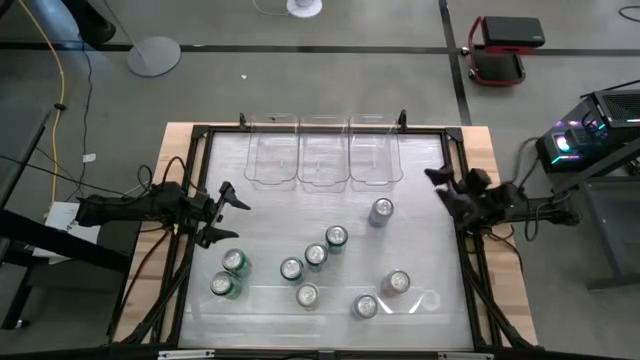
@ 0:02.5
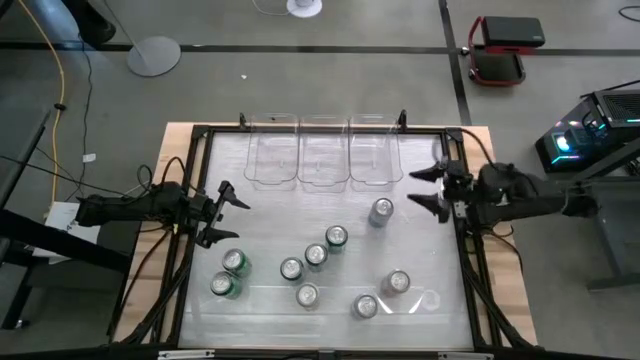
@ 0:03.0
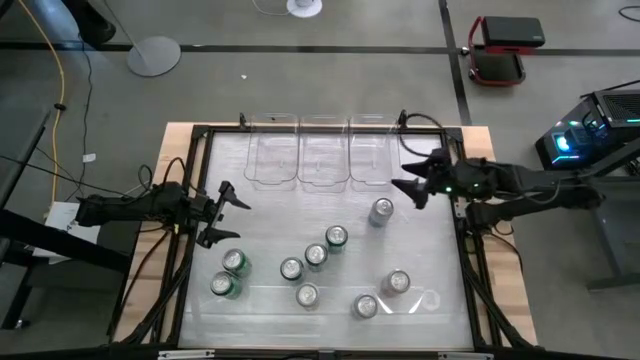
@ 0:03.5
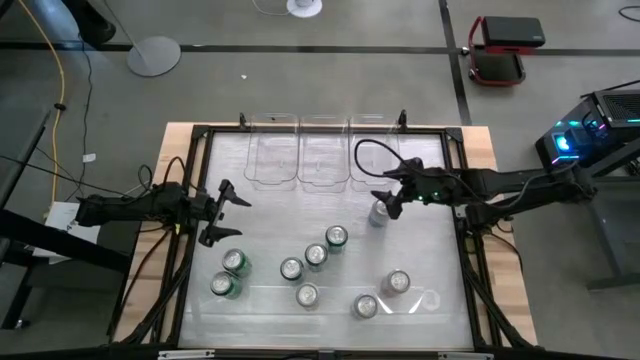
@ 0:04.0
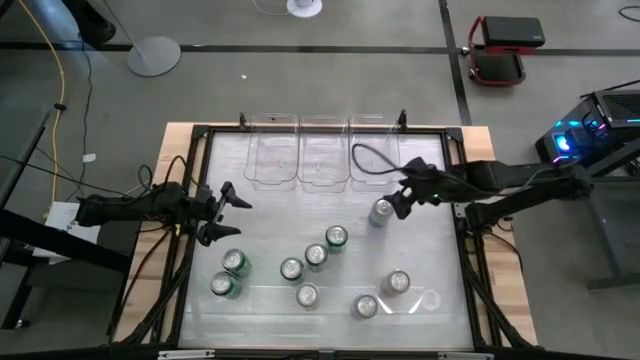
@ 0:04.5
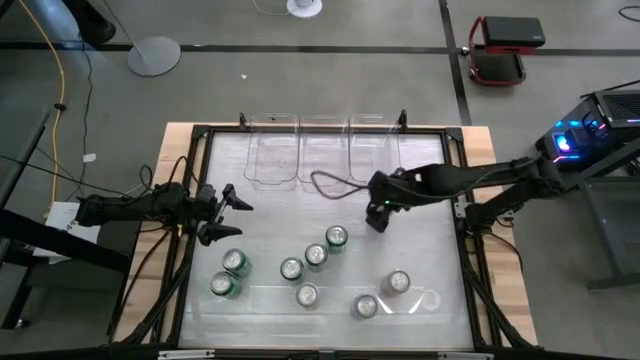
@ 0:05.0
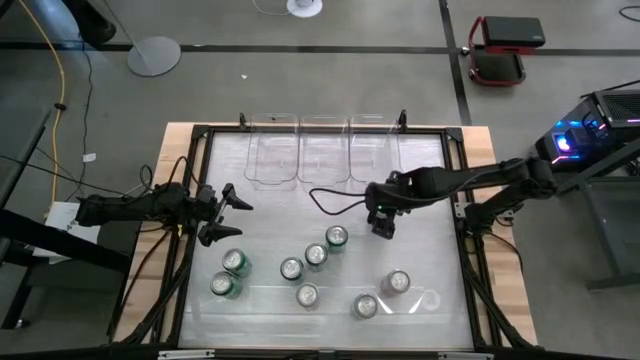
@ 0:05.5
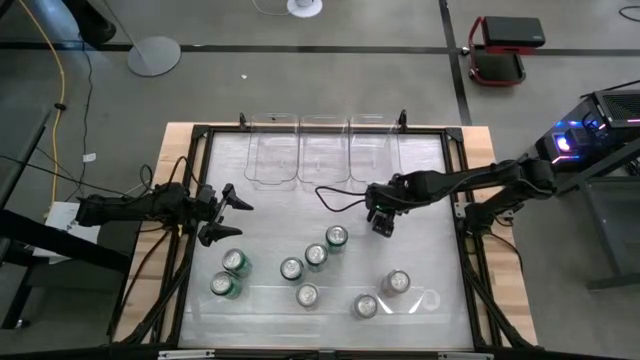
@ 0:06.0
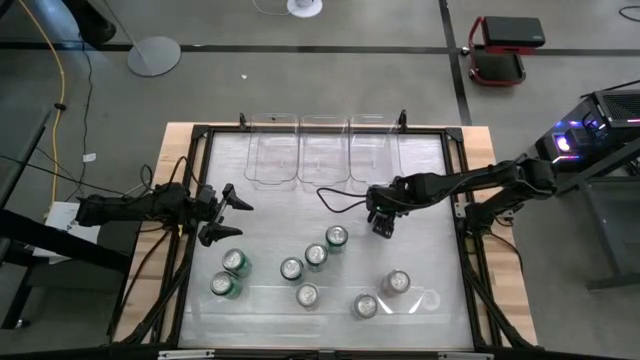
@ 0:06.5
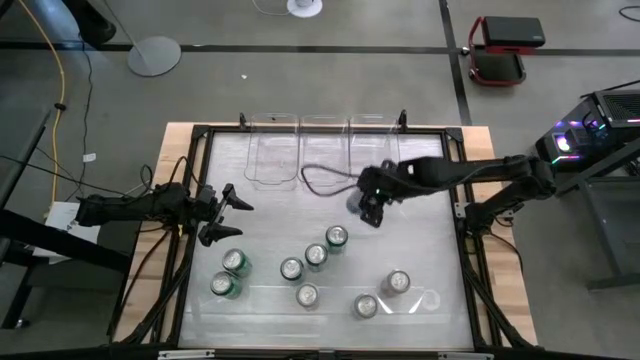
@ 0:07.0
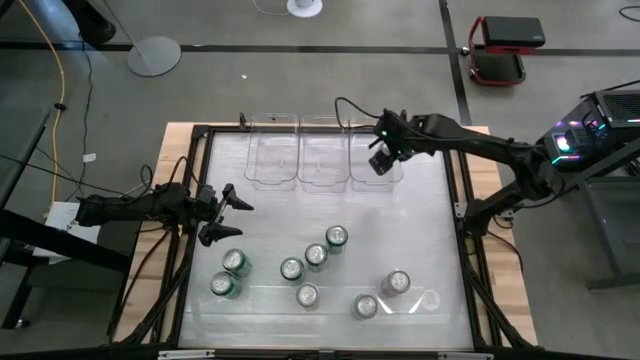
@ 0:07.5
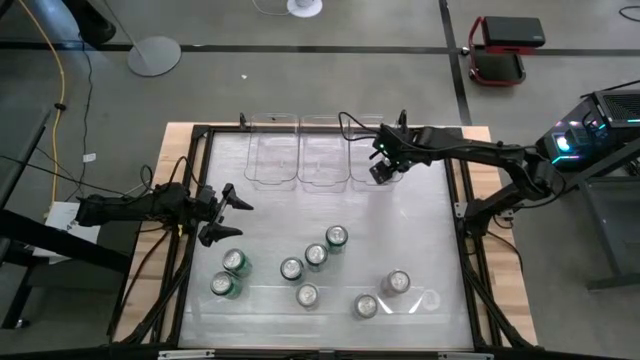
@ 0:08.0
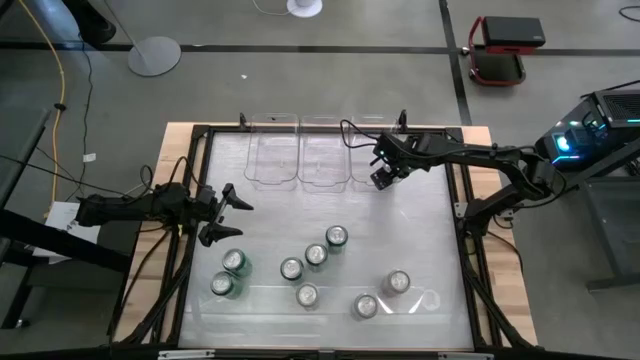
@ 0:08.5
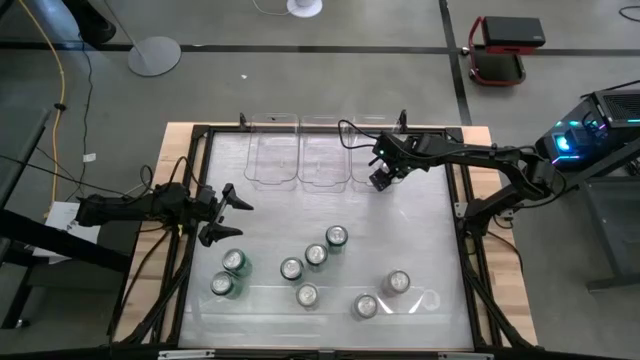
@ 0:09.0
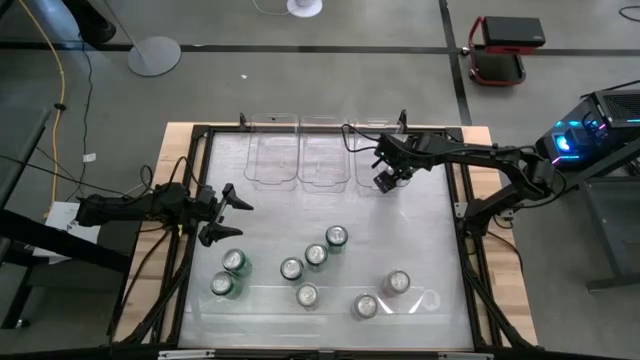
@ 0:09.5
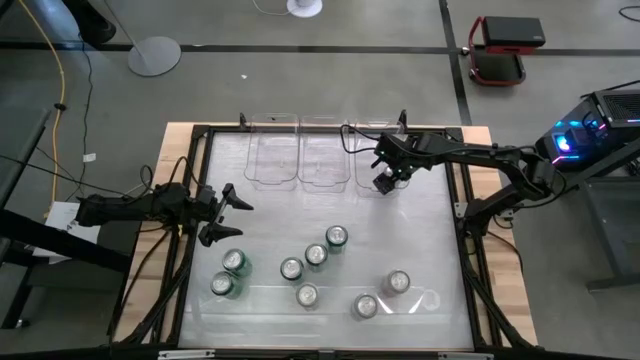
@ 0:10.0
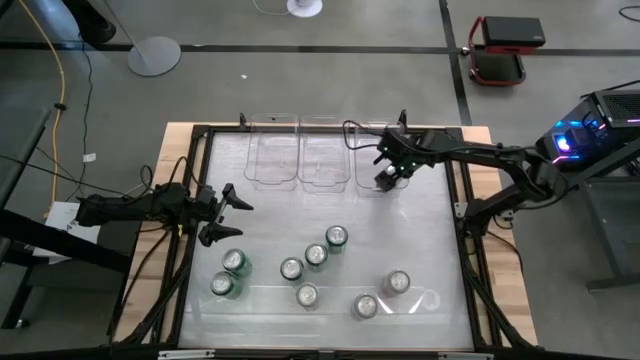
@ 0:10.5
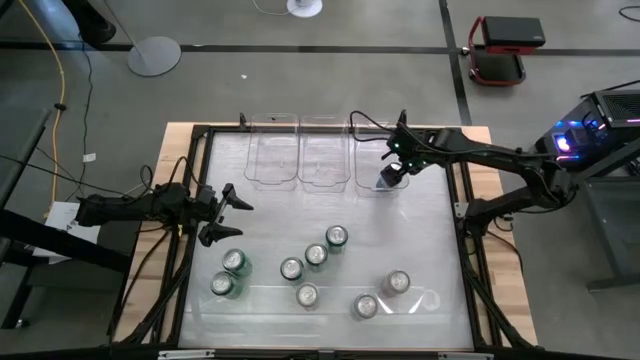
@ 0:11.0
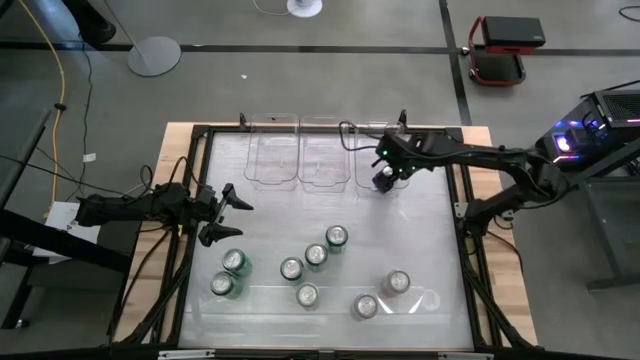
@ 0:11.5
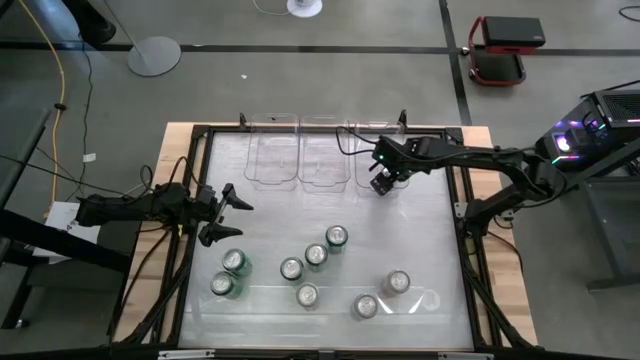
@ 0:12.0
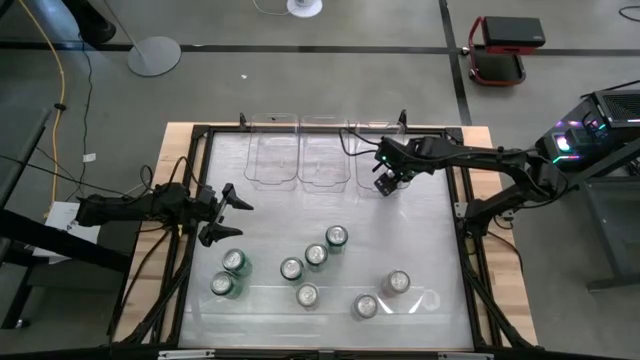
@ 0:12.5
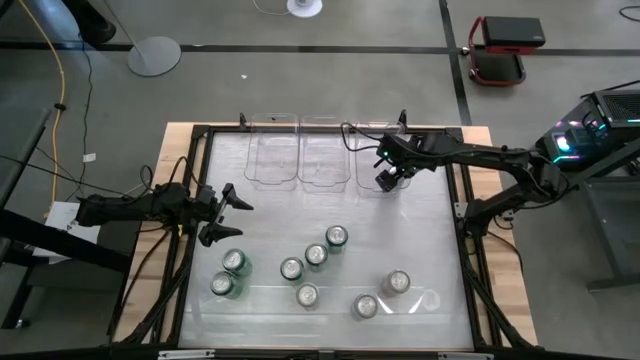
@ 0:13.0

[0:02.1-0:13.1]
Task: Sort soda cans
Put the blue-white soda can into the right transparent bin

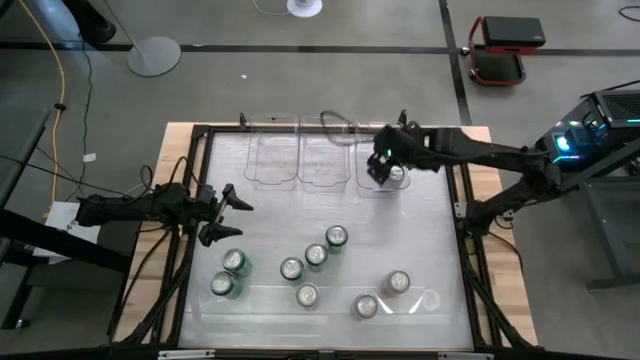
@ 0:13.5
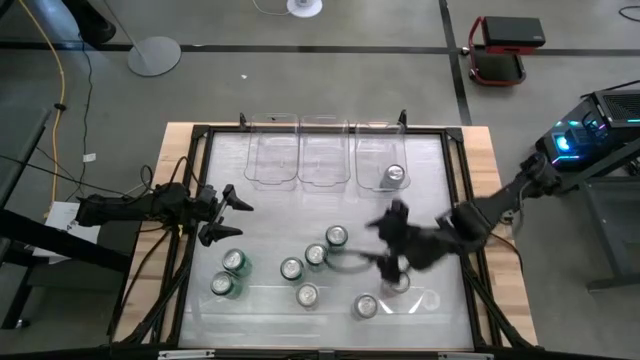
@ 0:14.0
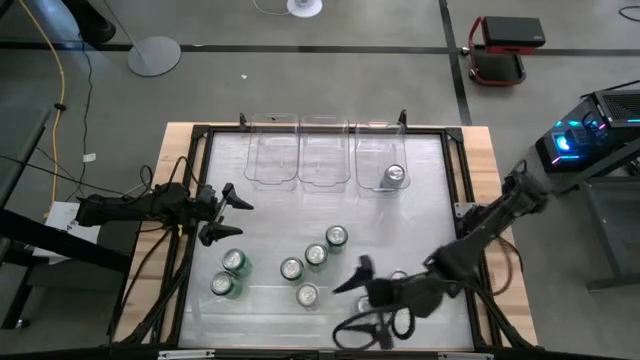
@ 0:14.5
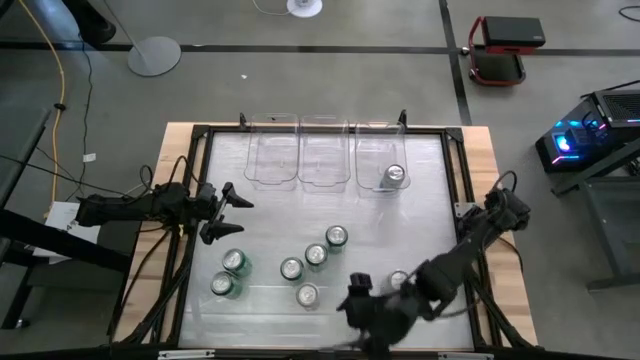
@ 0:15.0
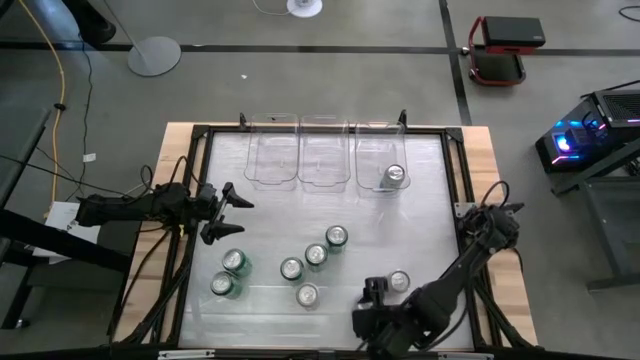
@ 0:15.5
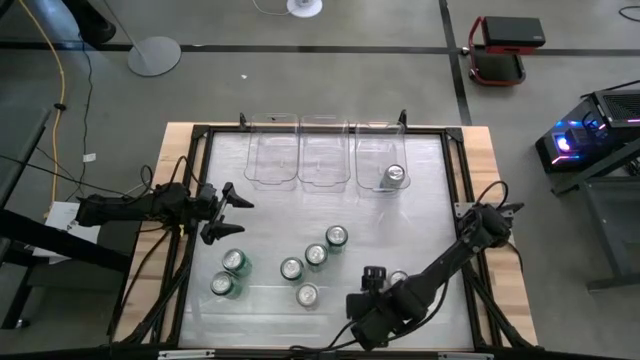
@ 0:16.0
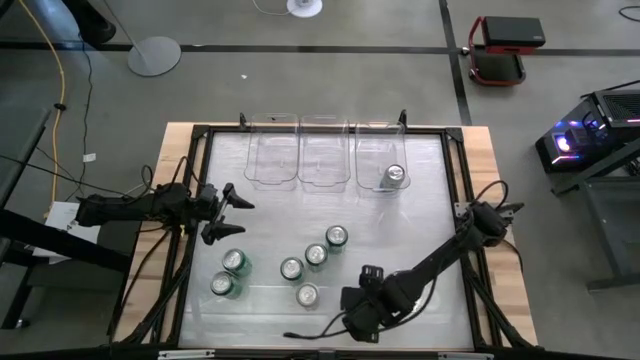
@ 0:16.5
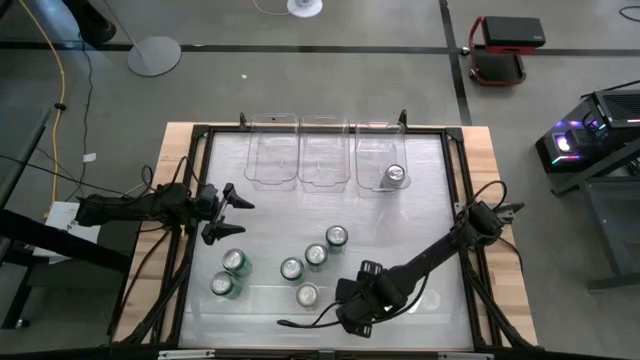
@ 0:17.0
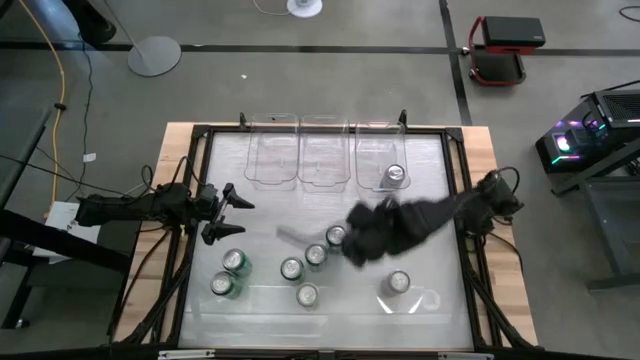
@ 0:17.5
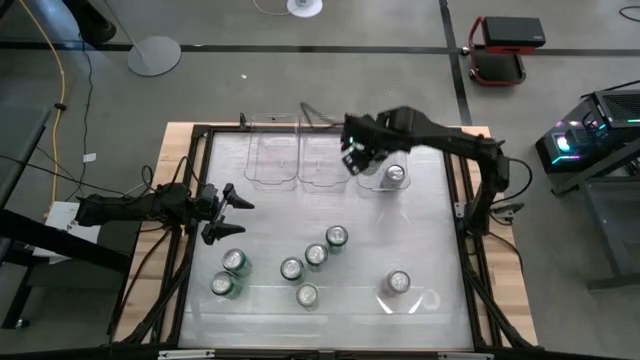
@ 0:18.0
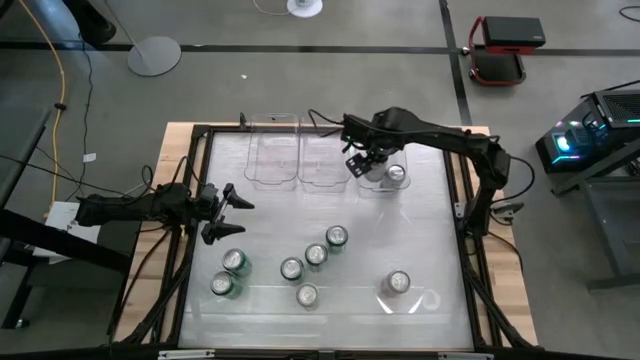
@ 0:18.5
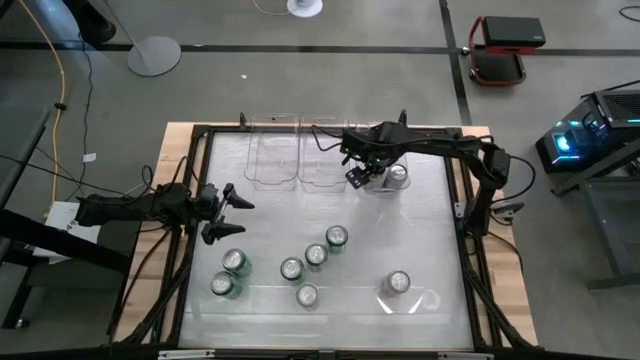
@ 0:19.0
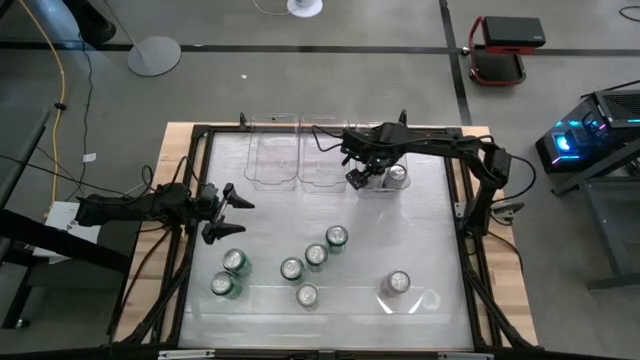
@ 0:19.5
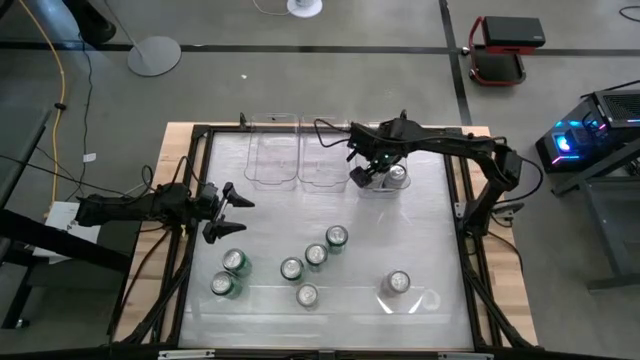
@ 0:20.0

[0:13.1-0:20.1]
Put the blue-white soda can into the right transparent bin

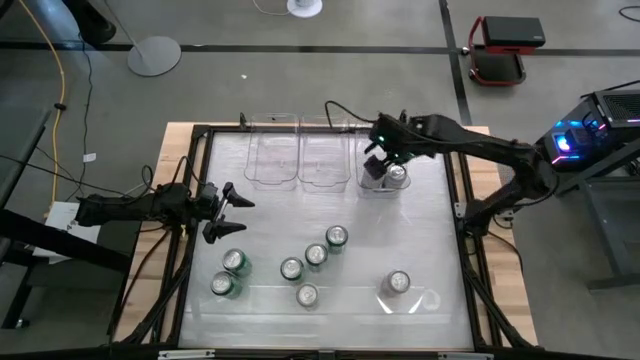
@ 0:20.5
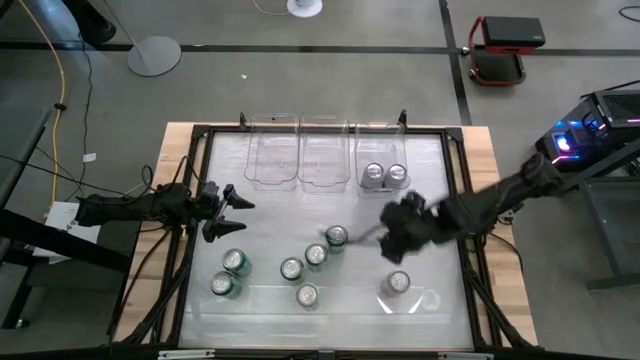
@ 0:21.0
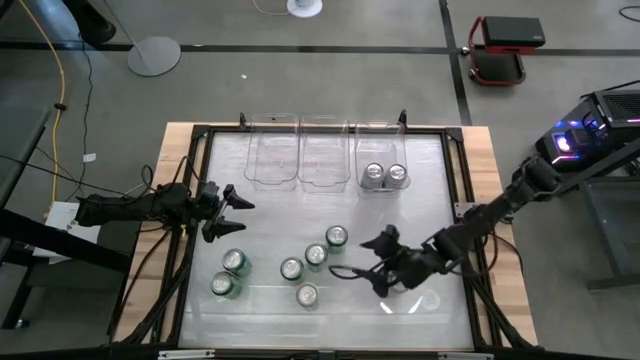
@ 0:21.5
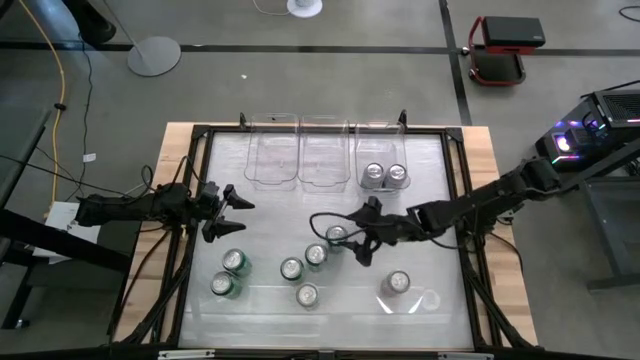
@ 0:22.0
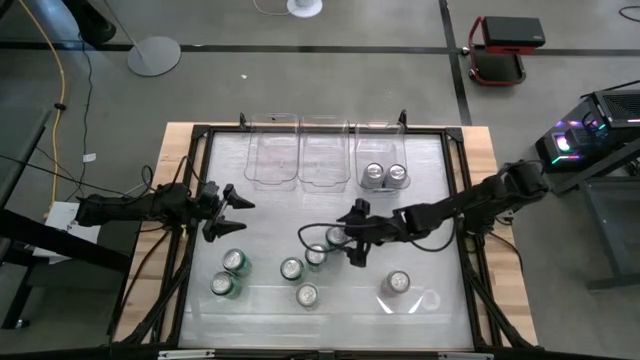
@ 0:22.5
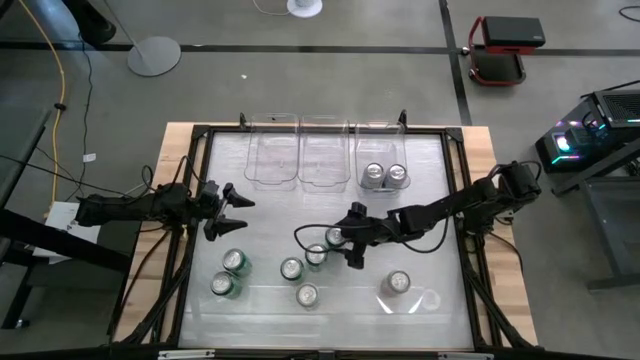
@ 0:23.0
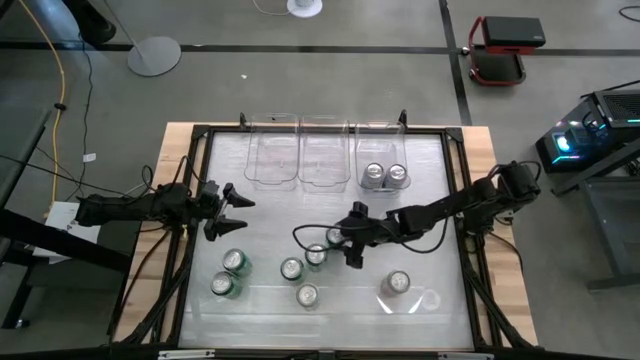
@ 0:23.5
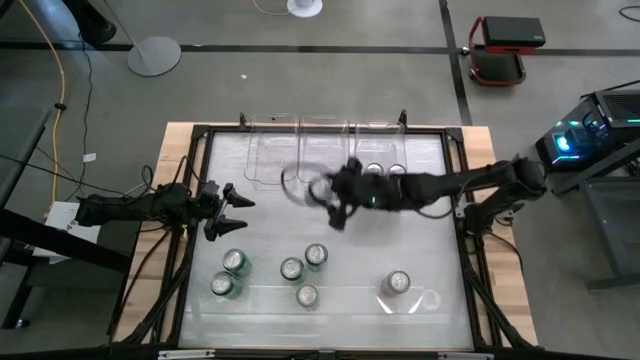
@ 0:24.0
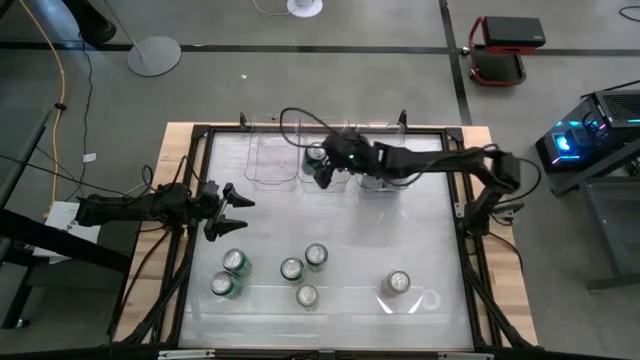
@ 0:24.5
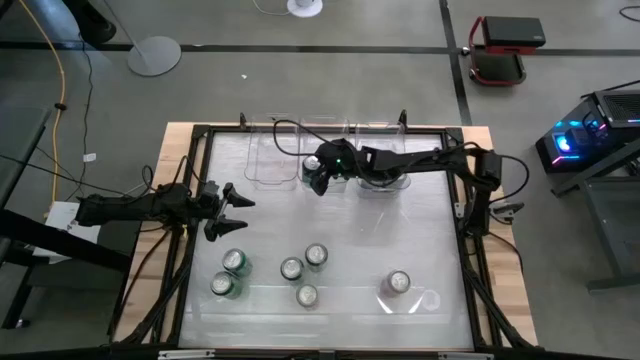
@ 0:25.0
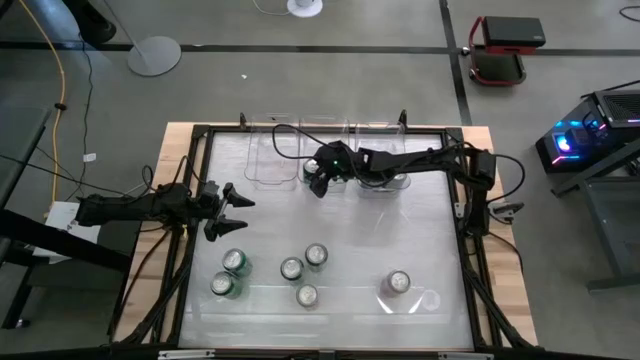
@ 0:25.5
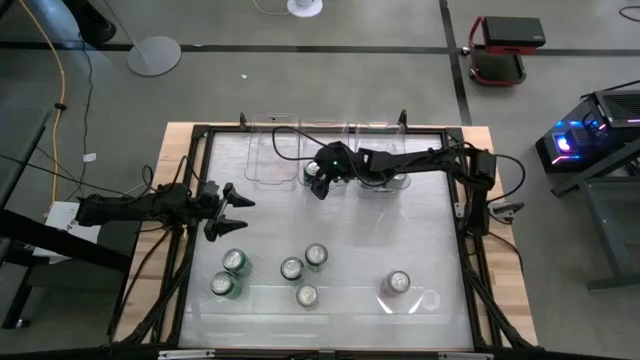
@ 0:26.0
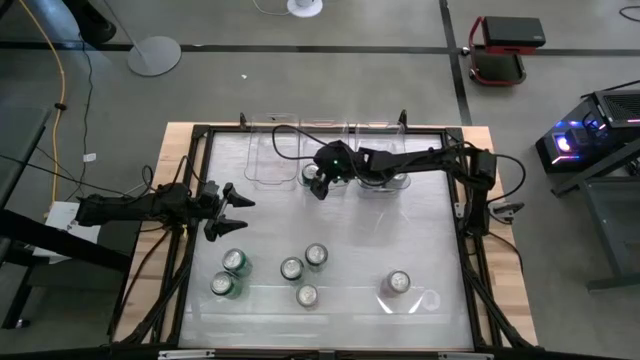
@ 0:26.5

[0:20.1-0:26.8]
Put the green soda can into the middle transparent bin
